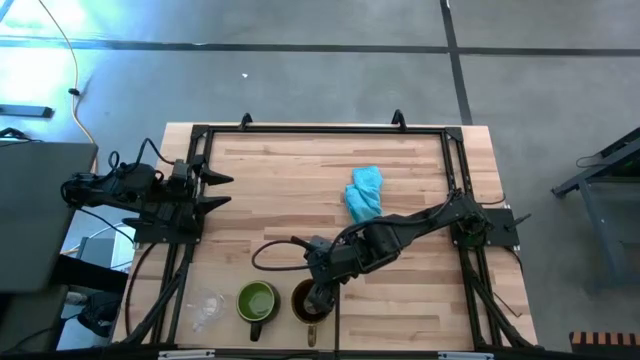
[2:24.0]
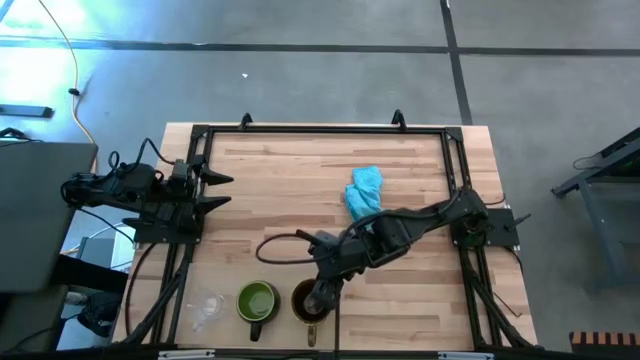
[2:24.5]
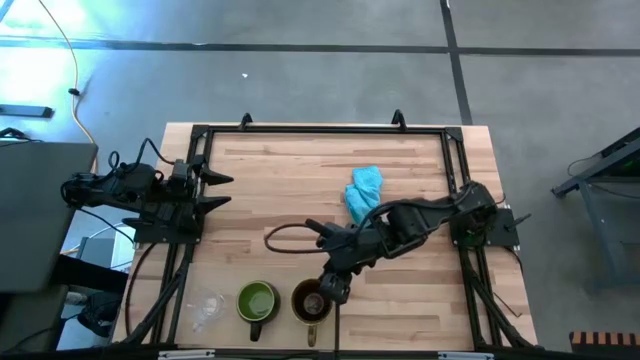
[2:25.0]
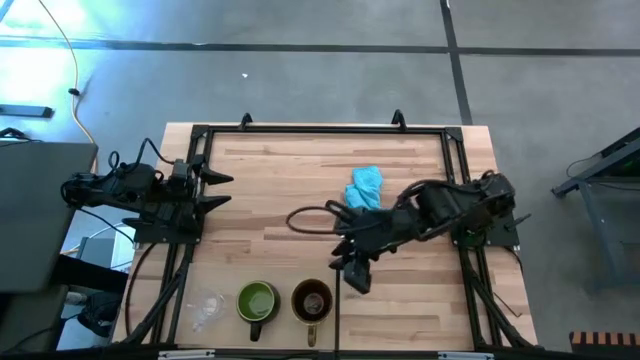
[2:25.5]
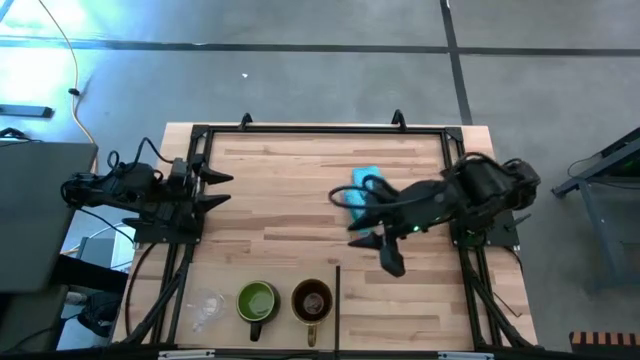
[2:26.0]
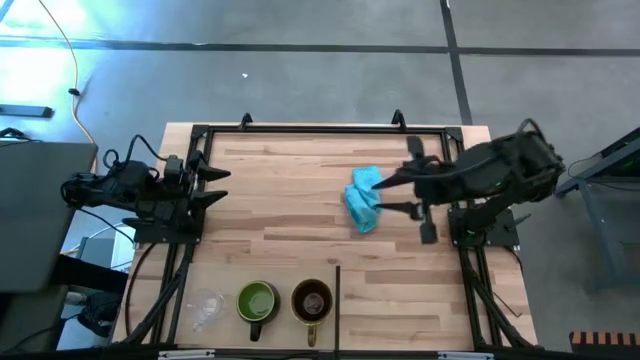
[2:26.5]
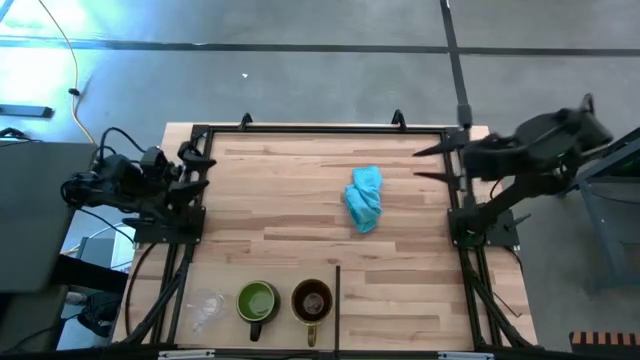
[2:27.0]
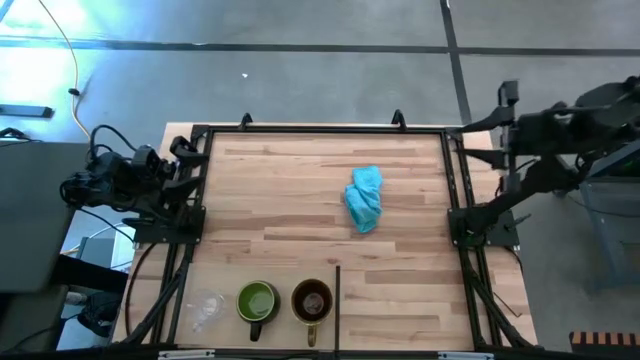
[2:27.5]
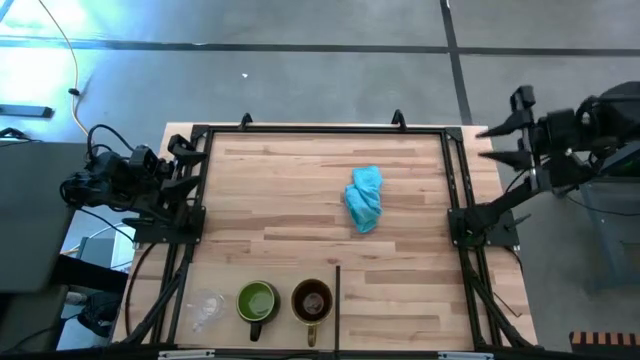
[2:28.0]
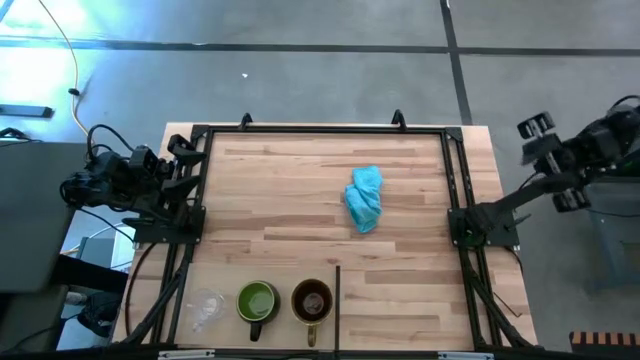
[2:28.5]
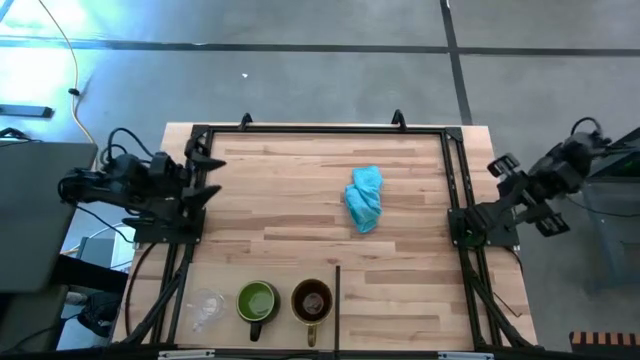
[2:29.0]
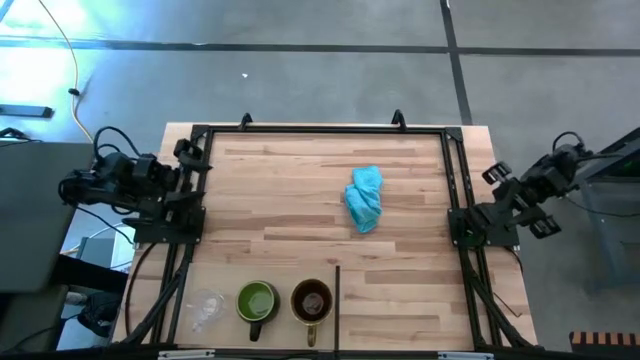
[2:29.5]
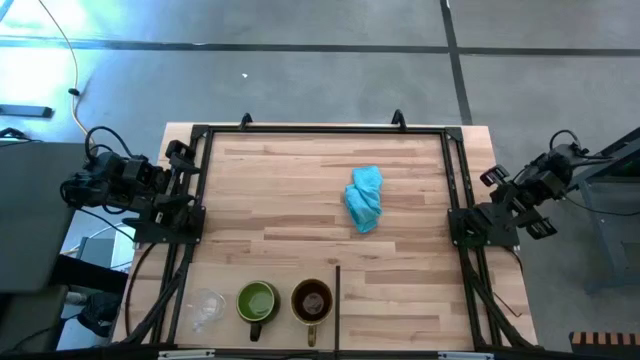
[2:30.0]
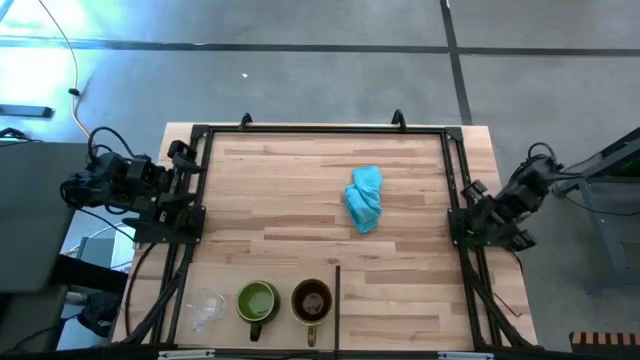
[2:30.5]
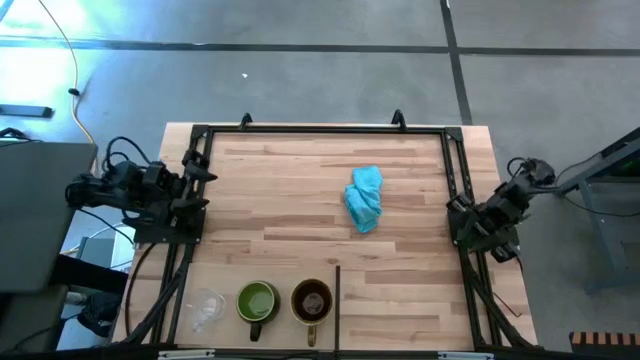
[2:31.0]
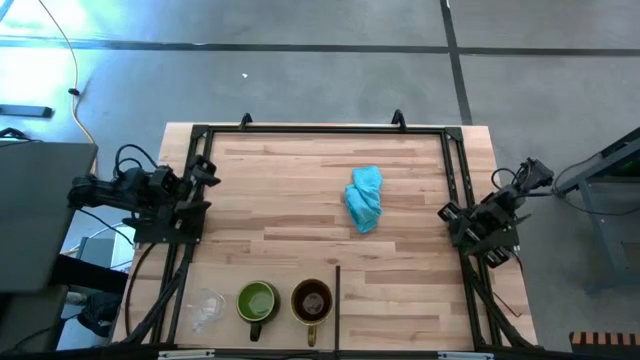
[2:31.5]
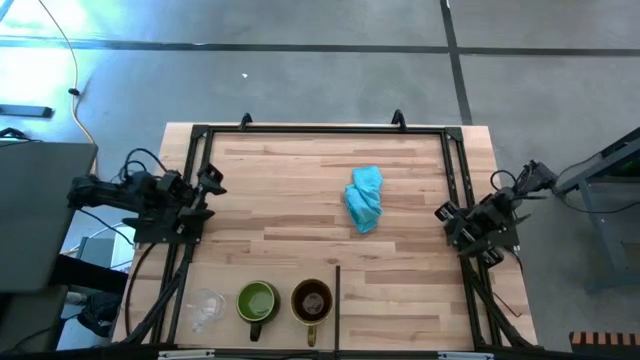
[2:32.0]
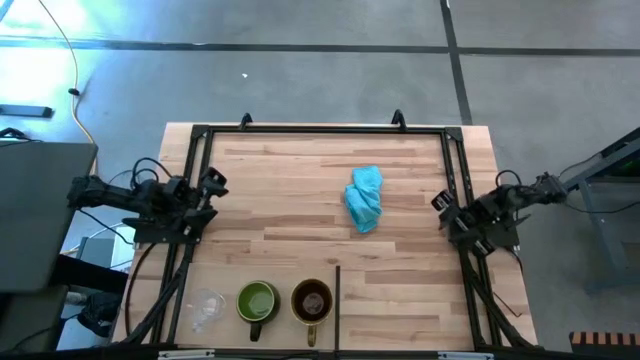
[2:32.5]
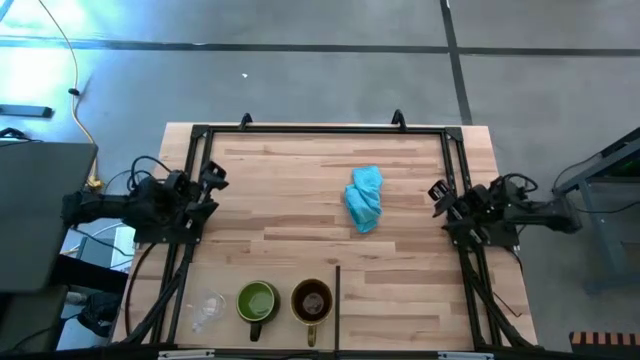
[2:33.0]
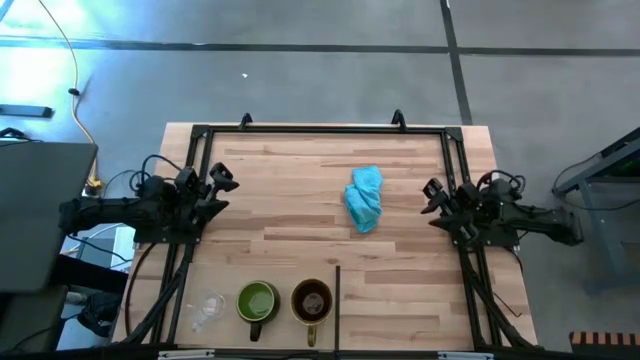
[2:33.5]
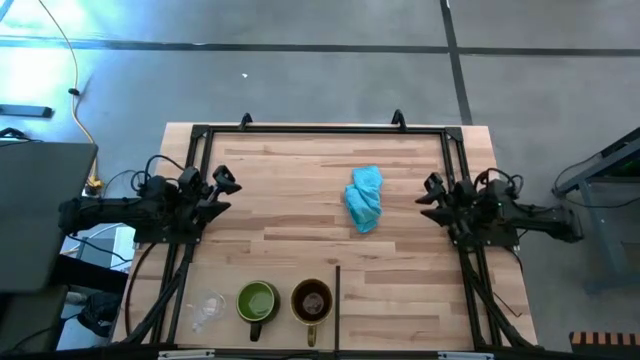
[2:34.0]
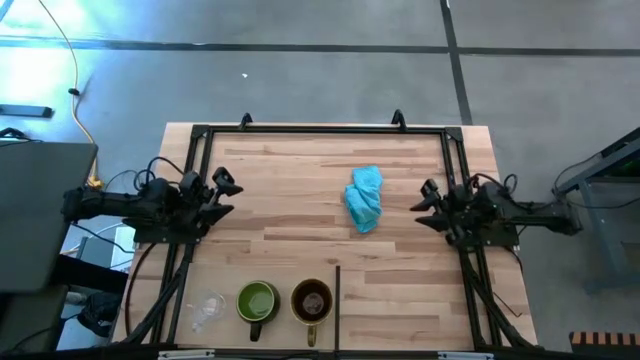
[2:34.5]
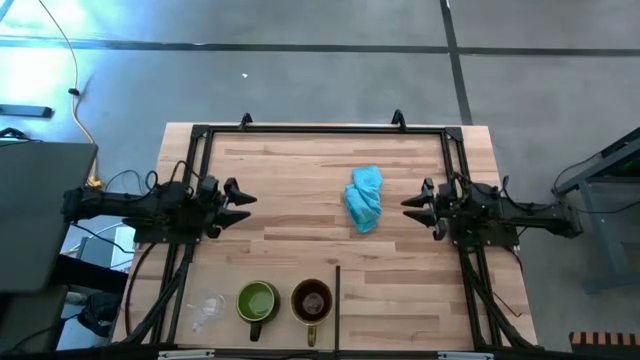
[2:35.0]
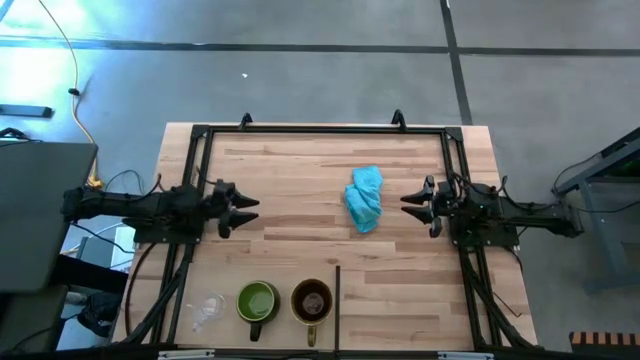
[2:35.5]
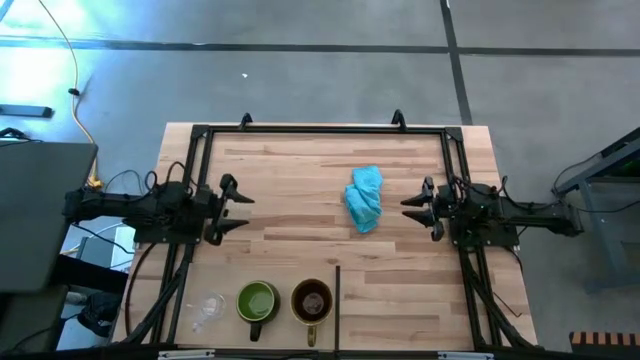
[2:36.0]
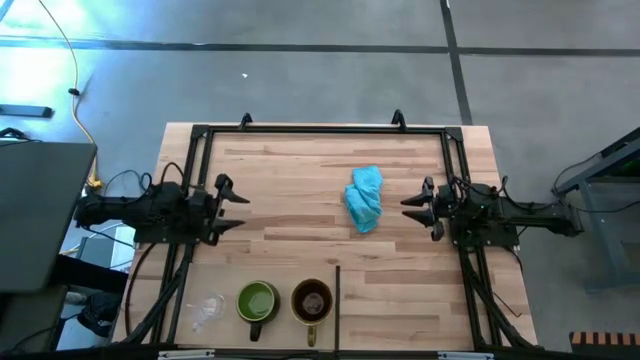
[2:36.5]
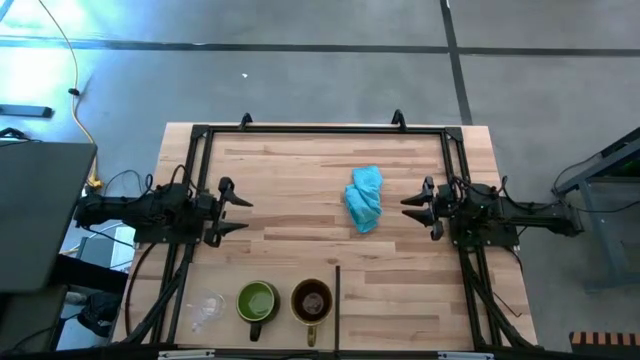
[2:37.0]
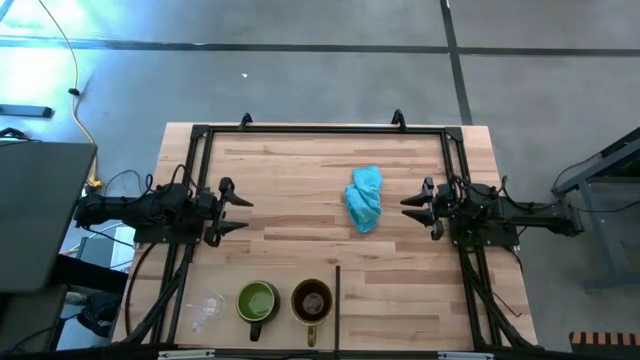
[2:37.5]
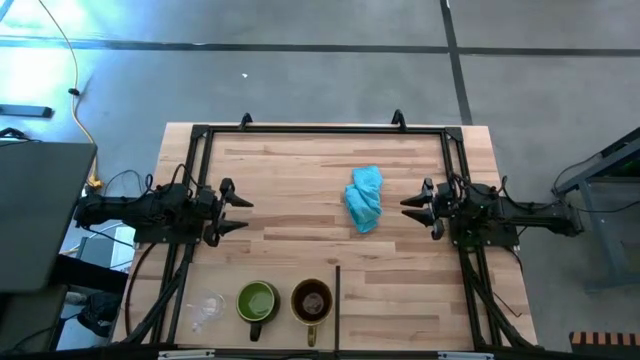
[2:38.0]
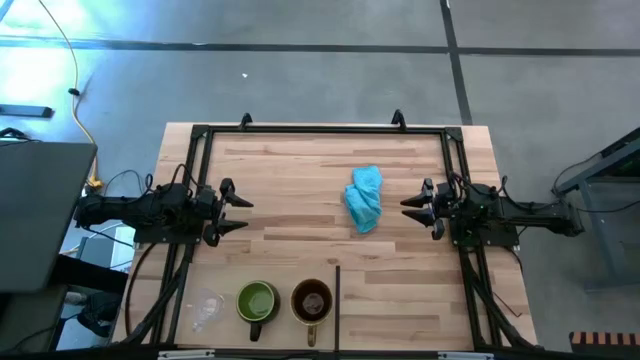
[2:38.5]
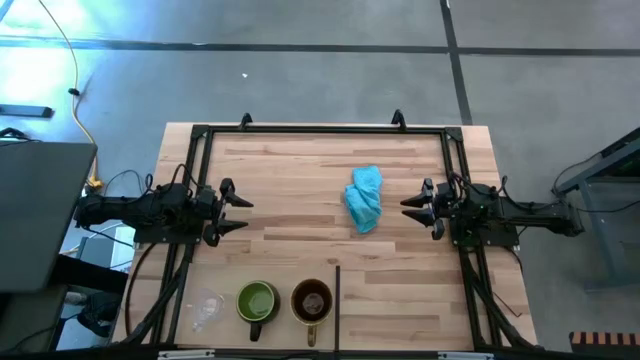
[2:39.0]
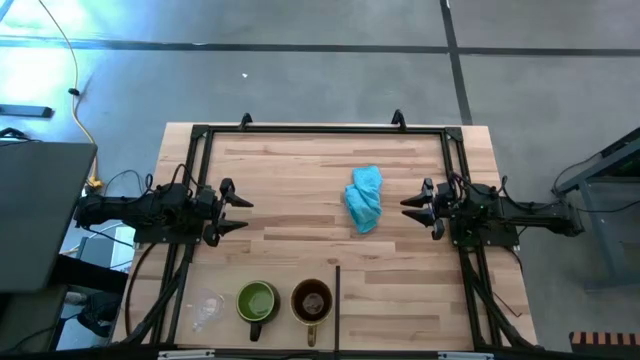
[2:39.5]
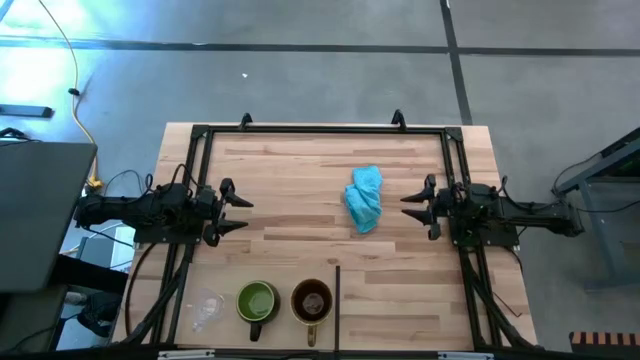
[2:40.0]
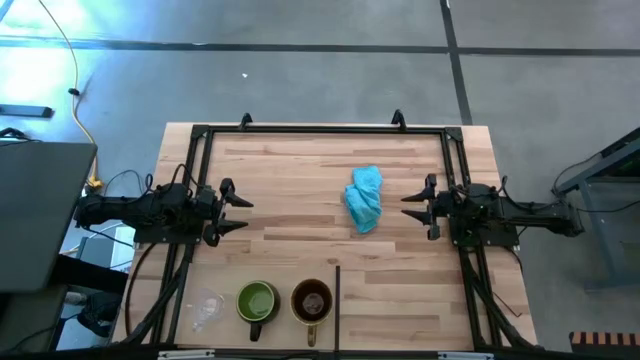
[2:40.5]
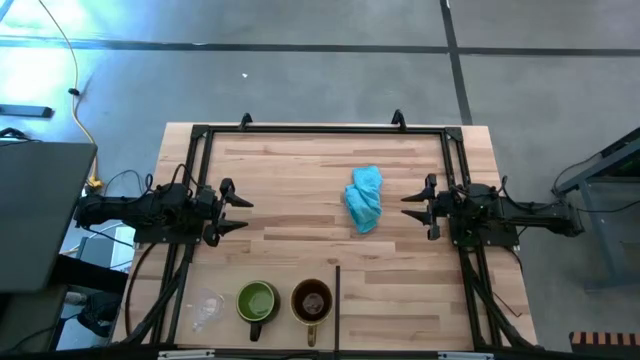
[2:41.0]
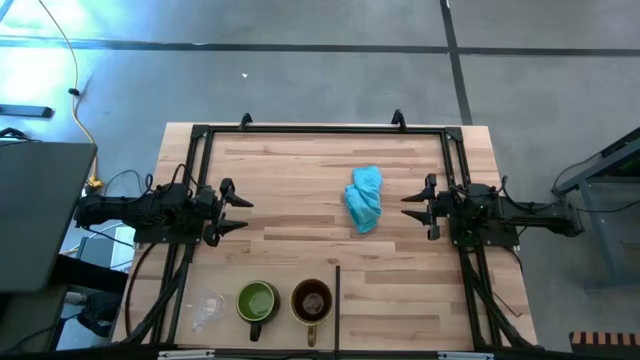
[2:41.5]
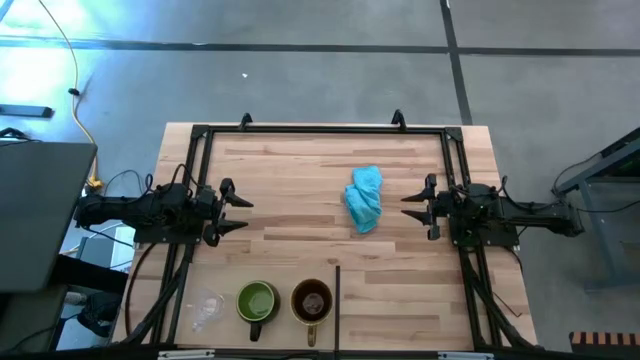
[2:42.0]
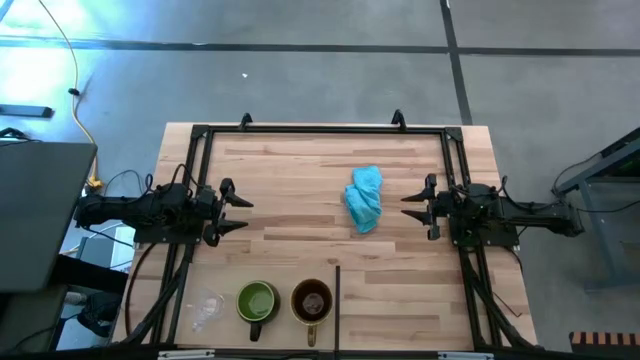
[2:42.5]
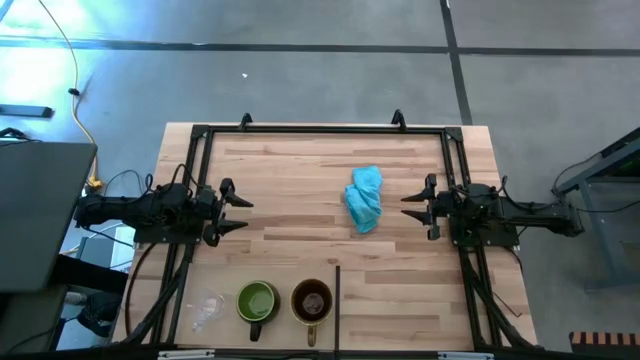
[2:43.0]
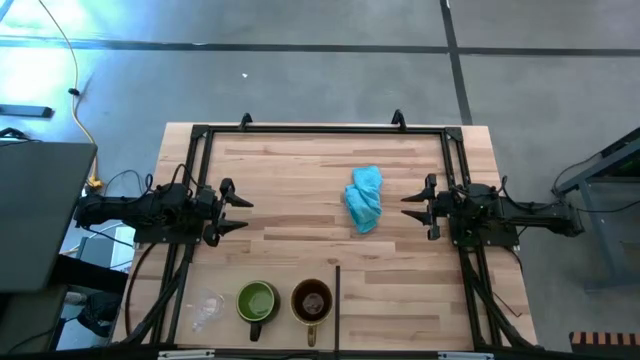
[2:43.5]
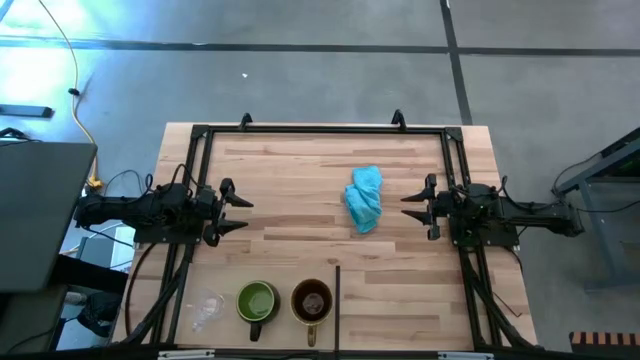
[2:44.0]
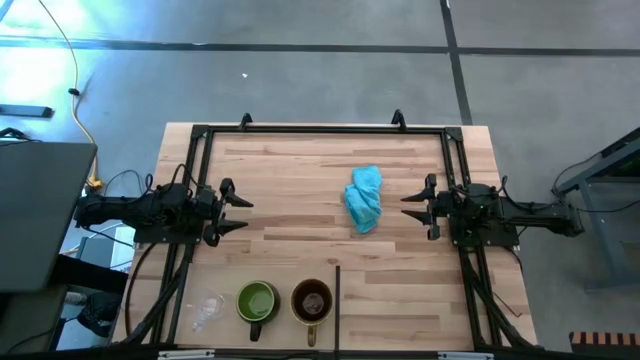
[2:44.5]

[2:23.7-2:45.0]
Task: Stack small to large cups/mugs on shelf
Return to Home Position
